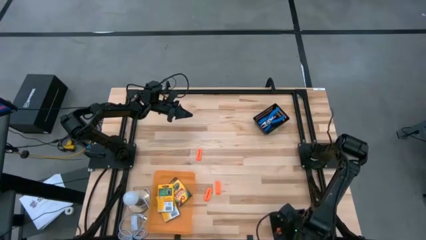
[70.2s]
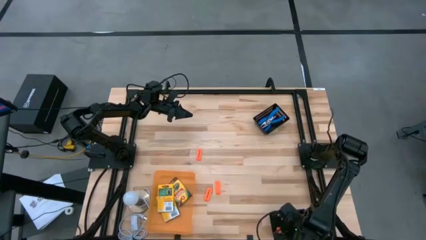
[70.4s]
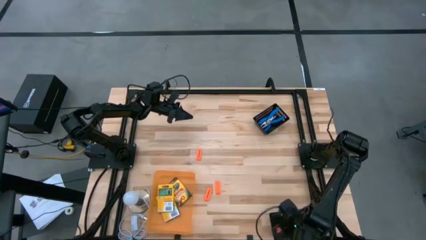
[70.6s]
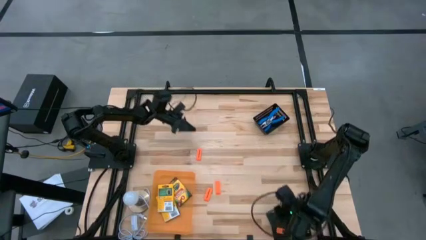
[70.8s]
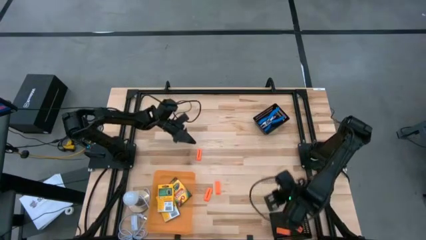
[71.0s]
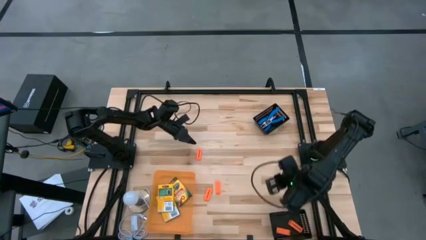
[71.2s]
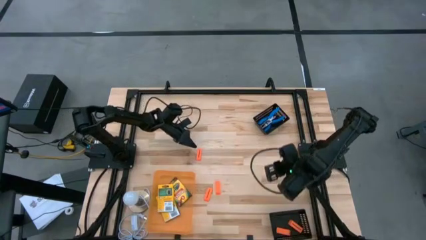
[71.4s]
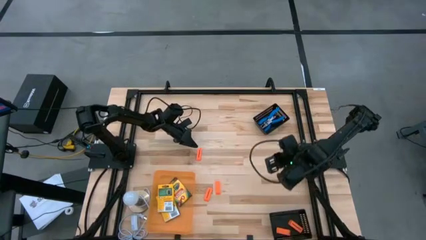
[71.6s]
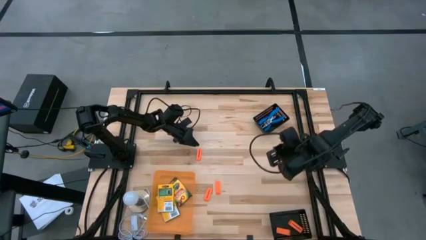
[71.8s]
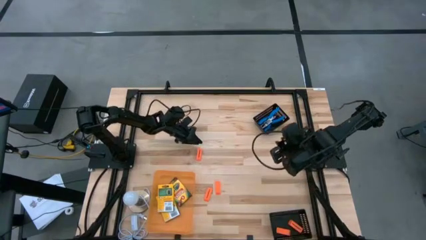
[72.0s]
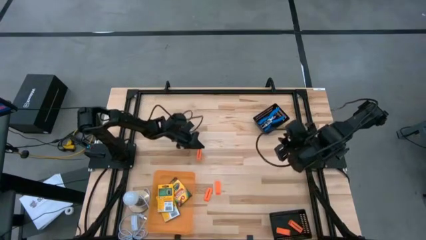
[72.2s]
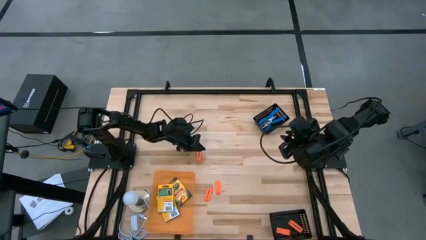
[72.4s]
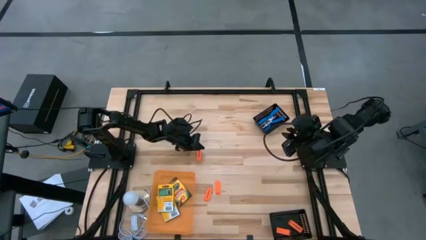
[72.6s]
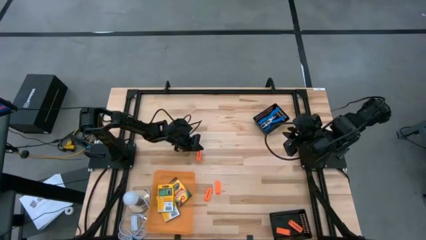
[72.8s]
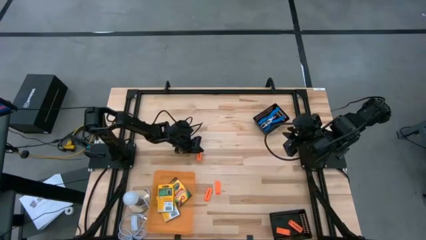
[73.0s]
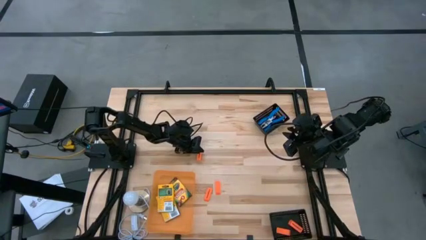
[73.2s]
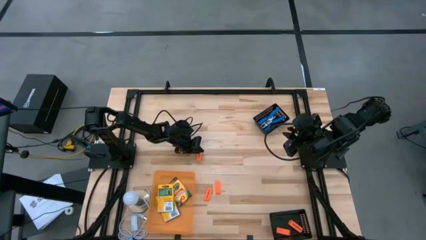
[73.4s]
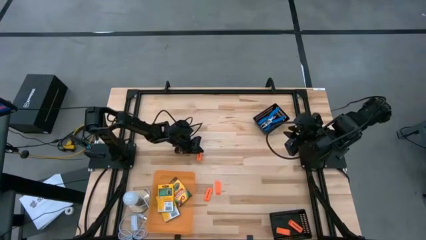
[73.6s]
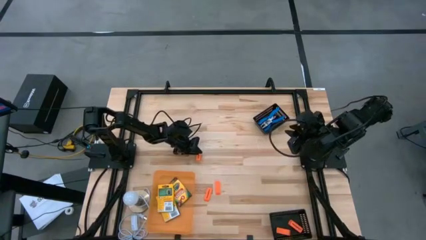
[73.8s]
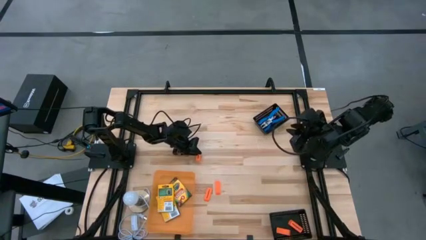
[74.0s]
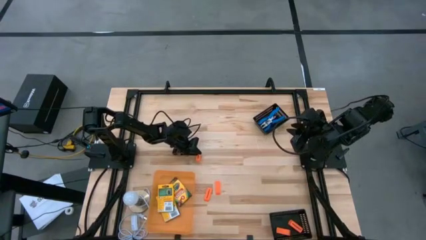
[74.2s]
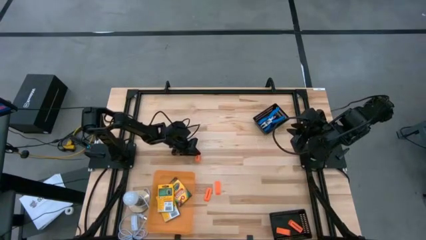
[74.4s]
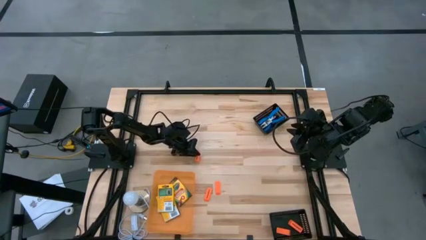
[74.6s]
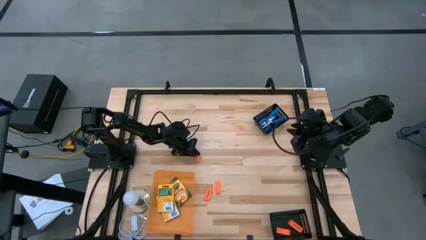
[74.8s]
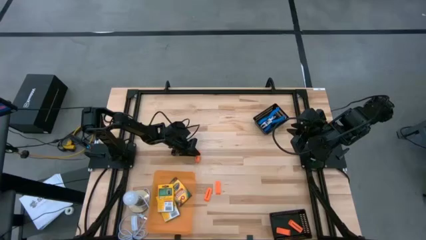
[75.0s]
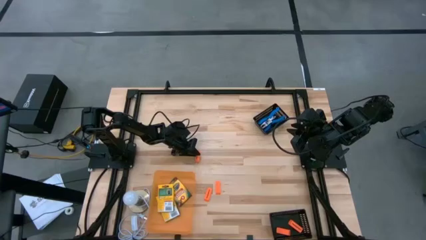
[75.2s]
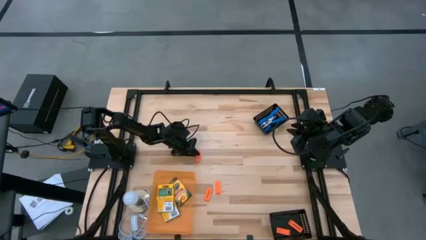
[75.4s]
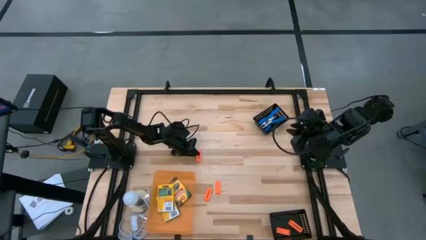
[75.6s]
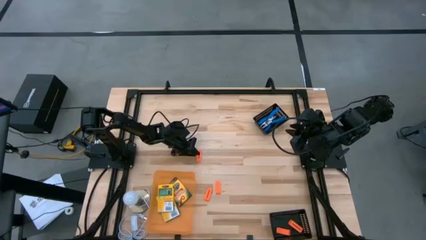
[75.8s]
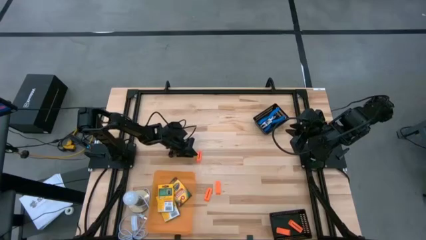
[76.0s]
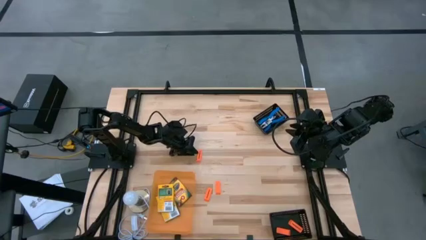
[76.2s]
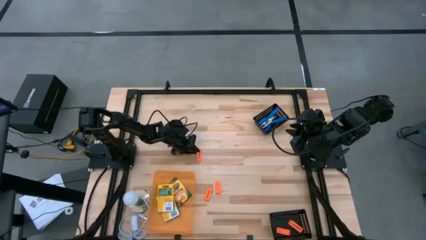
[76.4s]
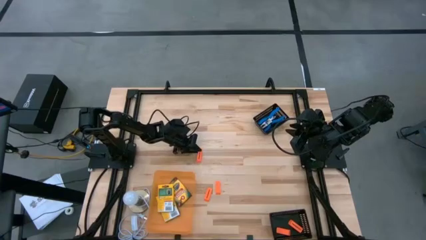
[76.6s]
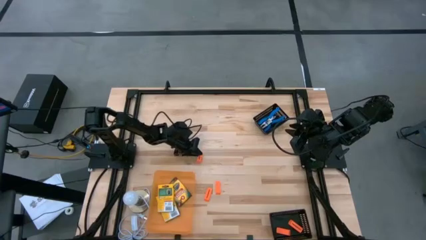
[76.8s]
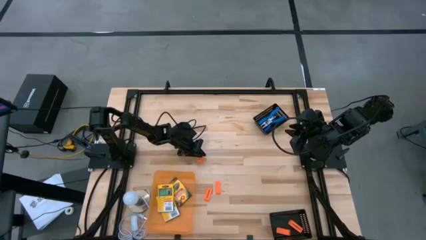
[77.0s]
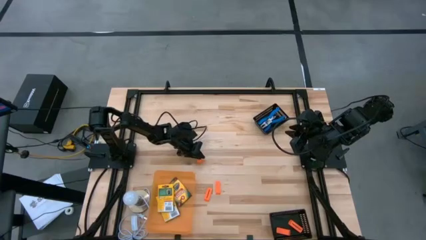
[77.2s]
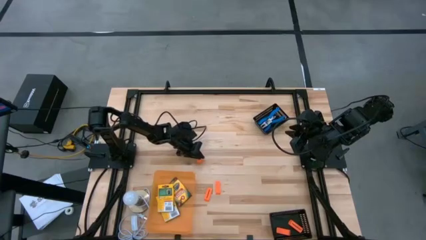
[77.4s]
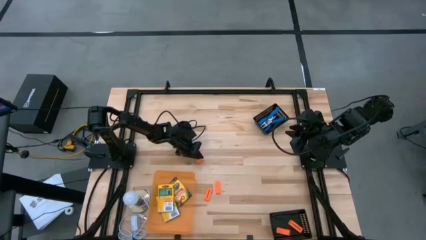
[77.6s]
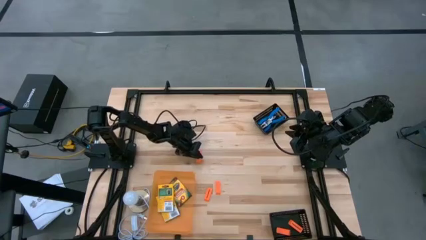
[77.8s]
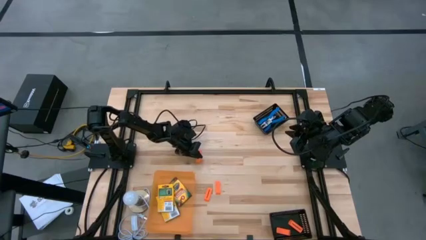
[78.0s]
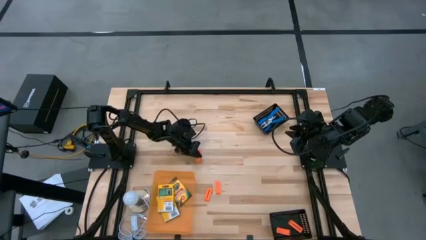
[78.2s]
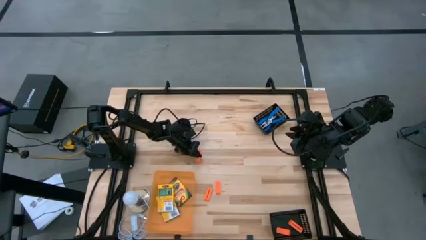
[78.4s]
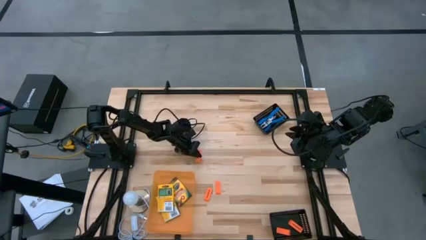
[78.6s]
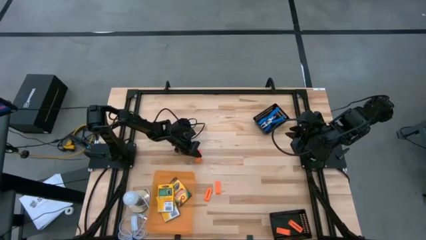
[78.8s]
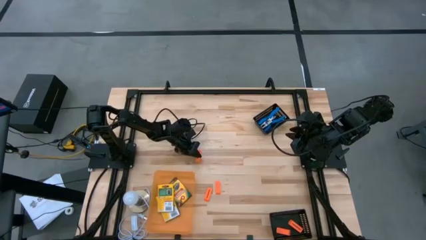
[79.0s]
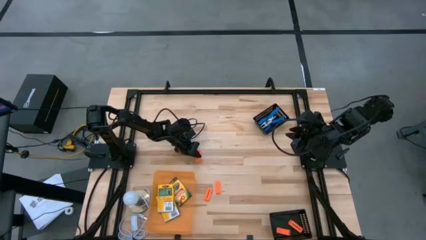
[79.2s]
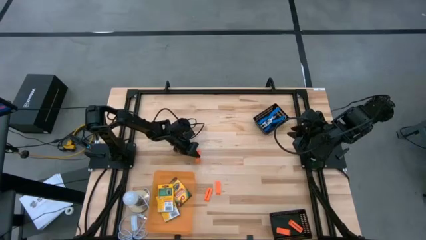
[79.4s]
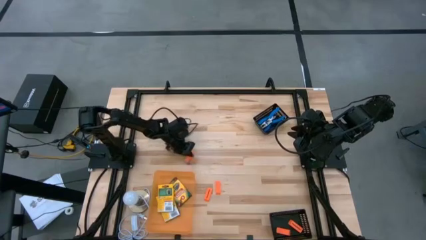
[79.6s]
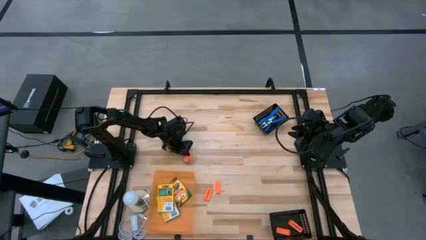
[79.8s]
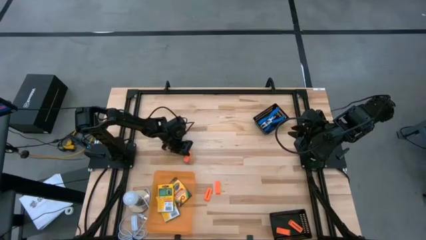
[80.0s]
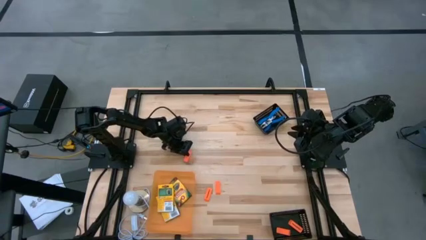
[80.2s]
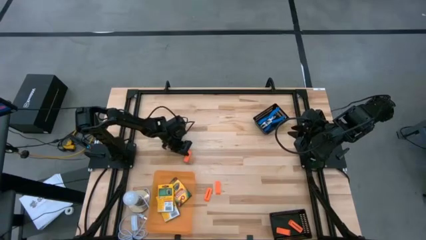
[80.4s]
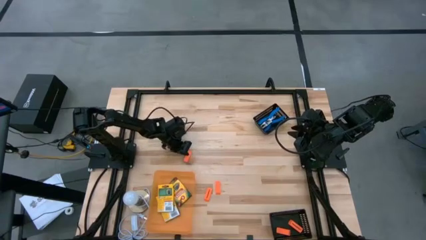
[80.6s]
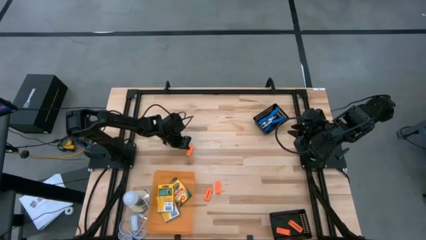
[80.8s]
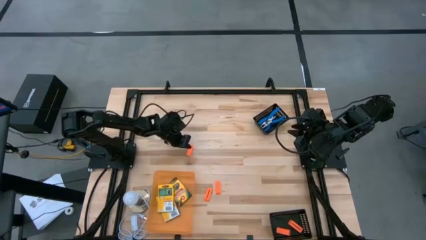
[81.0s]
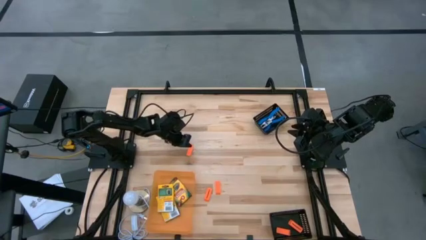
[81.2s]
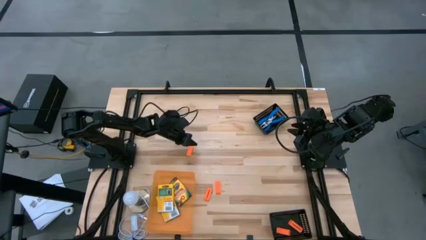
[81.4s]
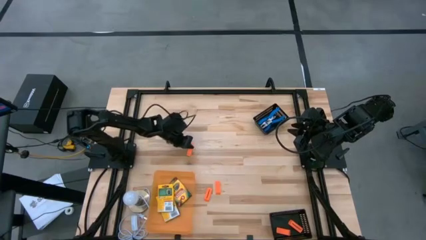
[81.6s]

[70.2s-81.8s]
Task: Pick & Place School Supplies
Put the orange eraser into the bottom black bin
